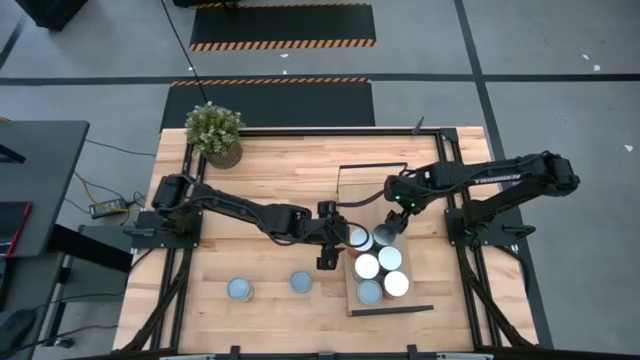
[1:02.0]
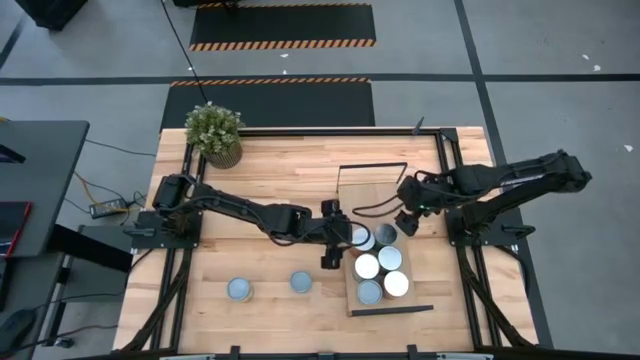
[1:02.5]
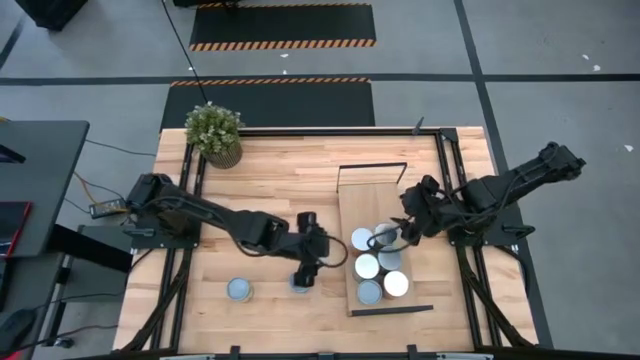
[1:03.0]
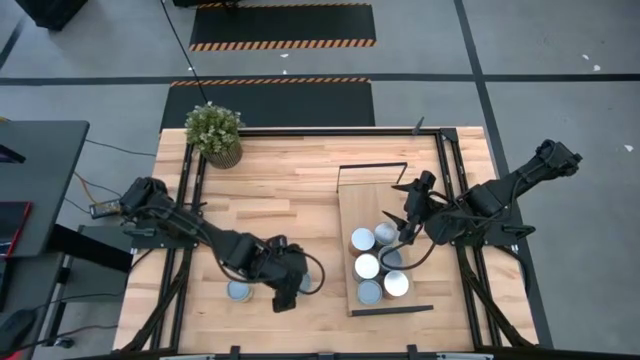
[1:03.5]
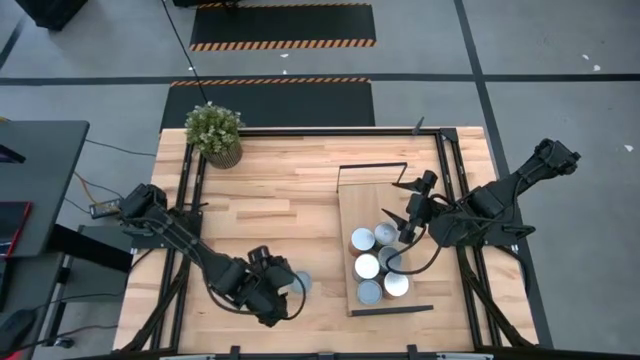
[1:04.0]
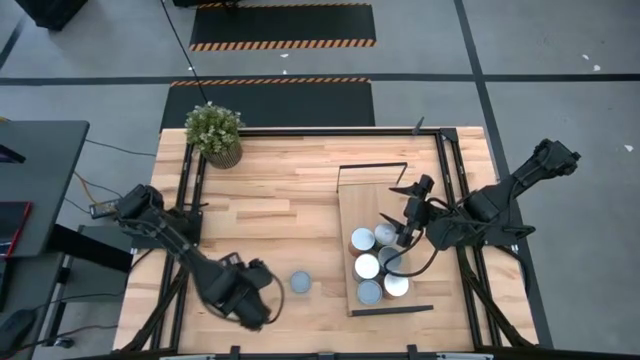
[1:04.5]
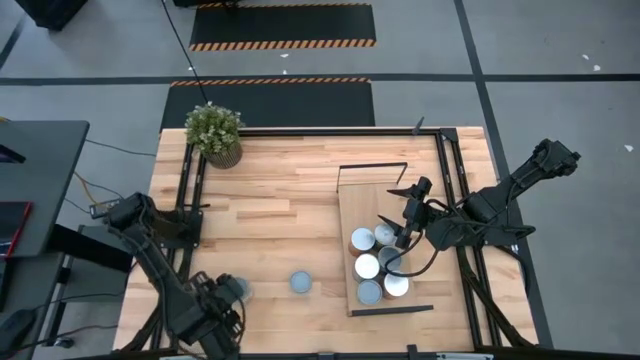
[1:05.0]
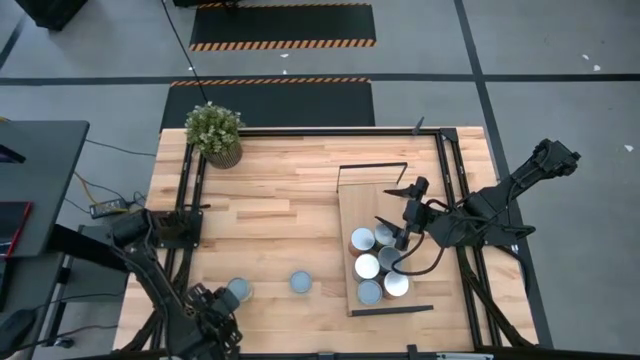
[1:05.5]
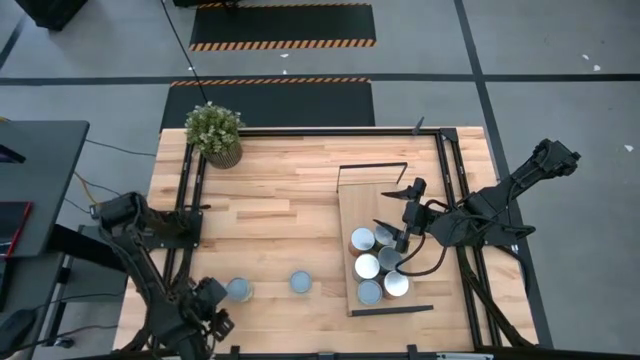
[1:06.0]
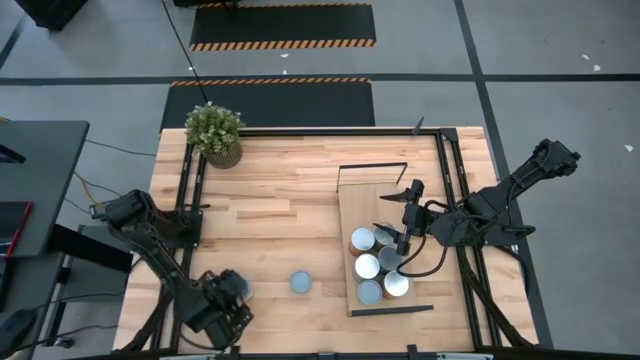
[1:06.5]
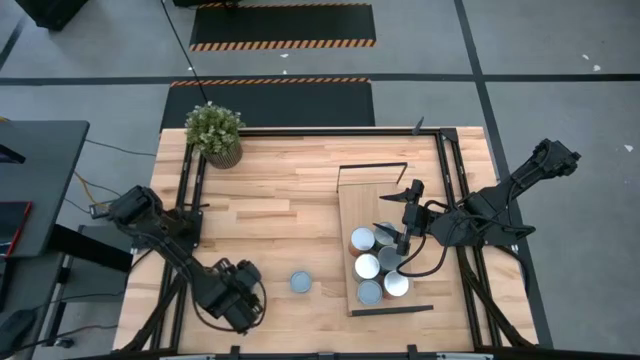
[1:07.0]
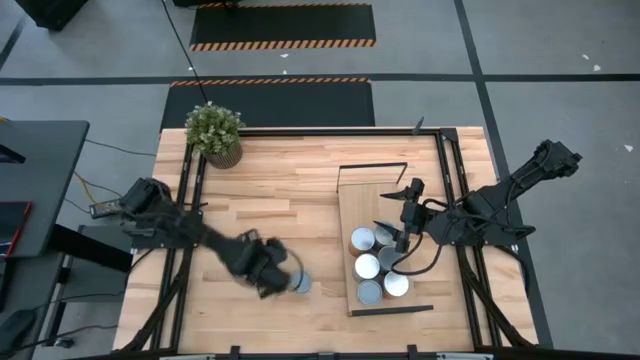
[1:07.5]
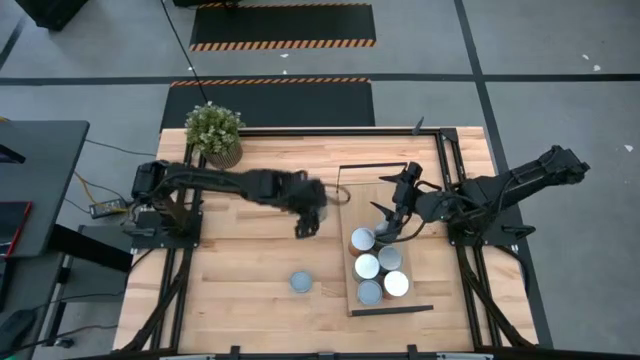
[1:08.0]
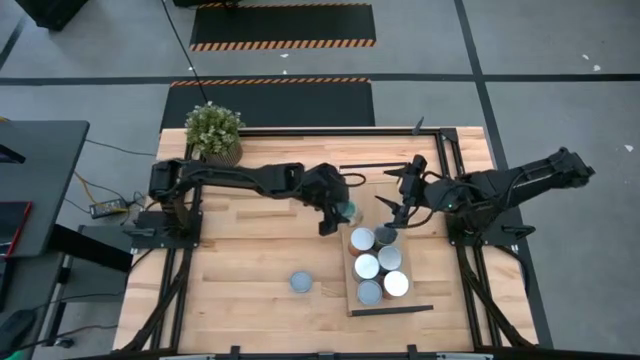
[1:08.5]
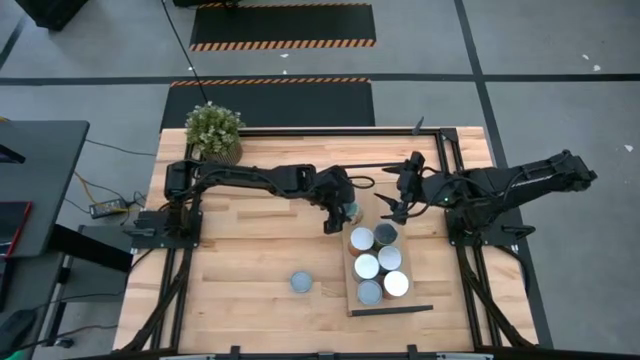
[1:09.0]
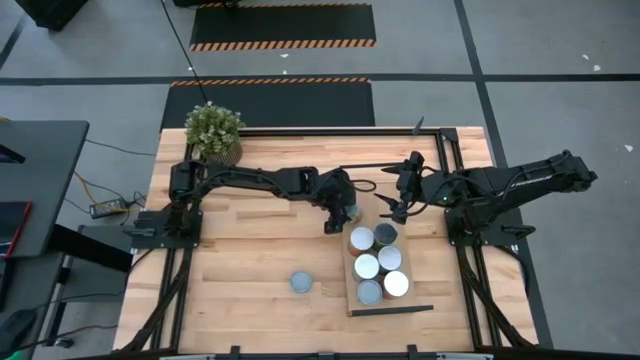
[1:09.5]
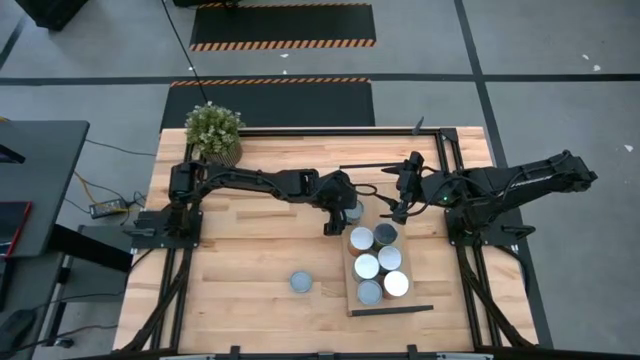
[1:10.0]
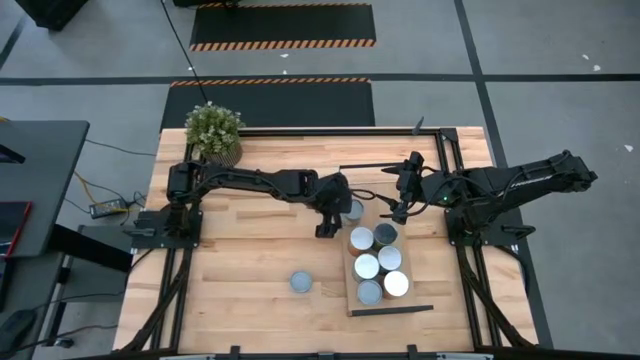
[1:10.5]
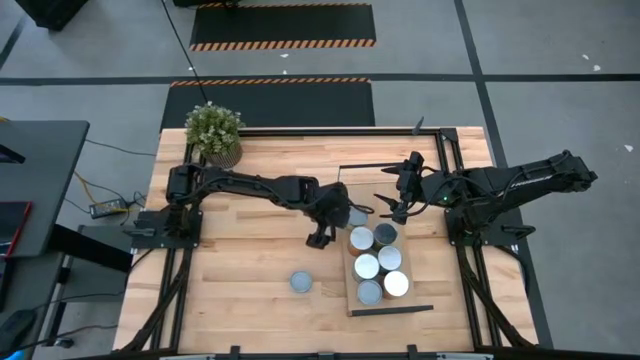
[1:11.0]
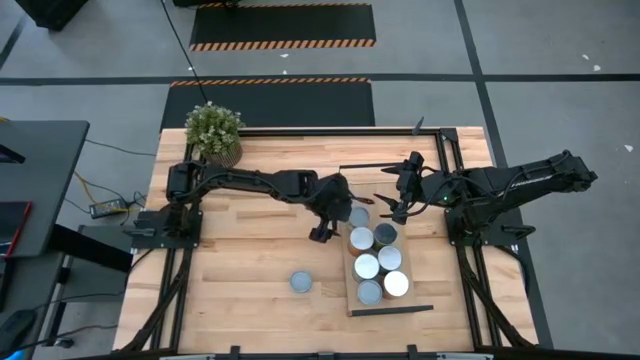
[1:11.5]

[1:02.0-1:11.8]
Task: Pick and place cans onto a shelf
Put the canned chicken soup on the shelf

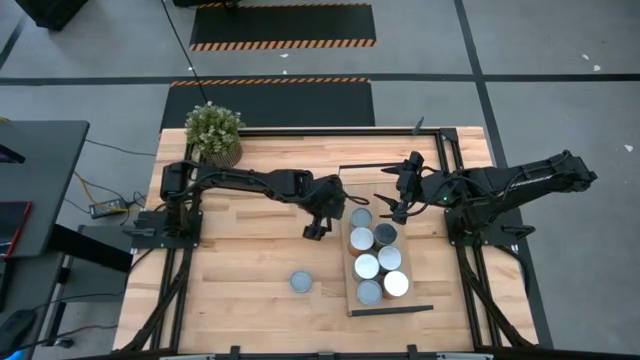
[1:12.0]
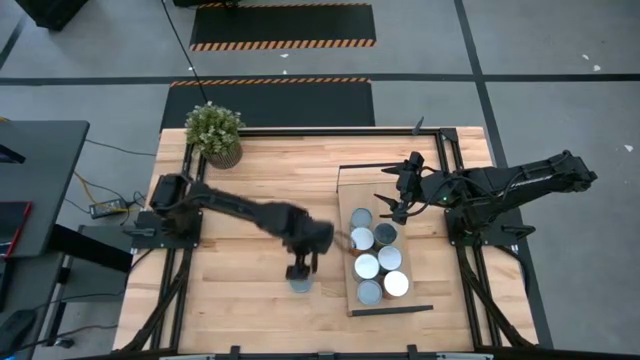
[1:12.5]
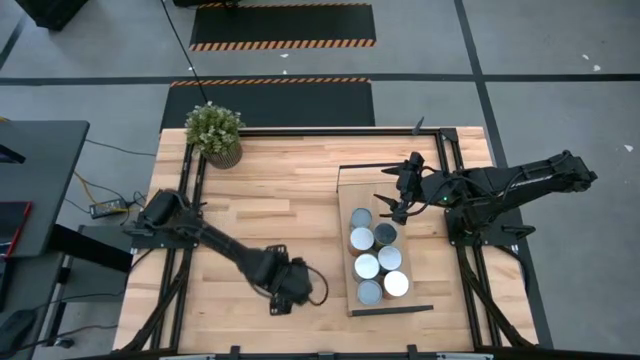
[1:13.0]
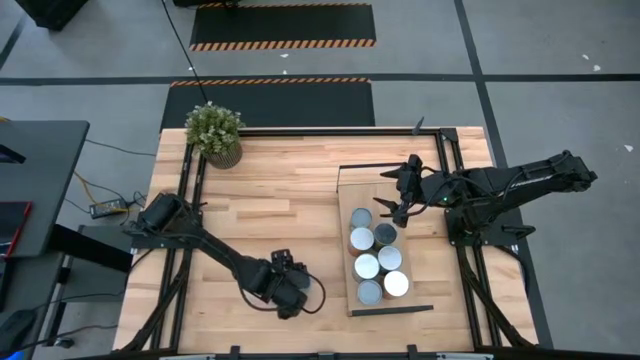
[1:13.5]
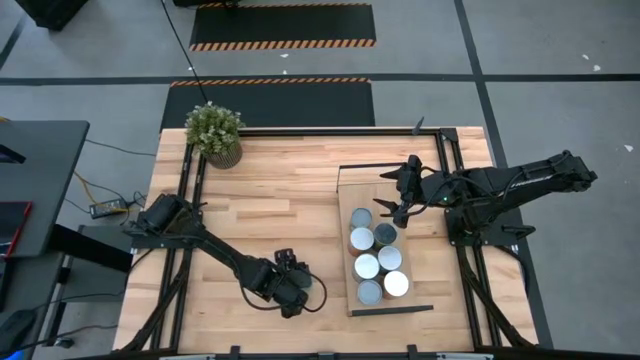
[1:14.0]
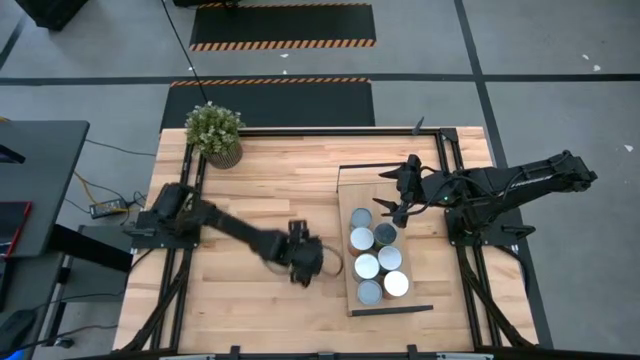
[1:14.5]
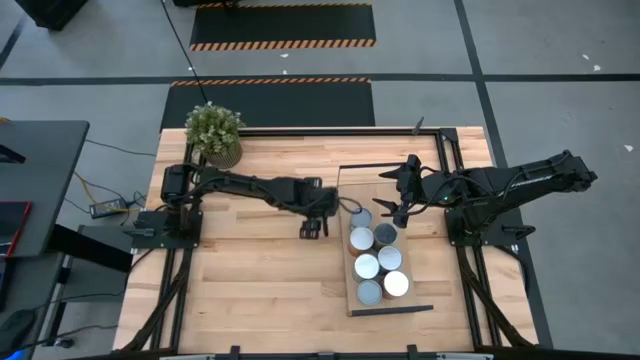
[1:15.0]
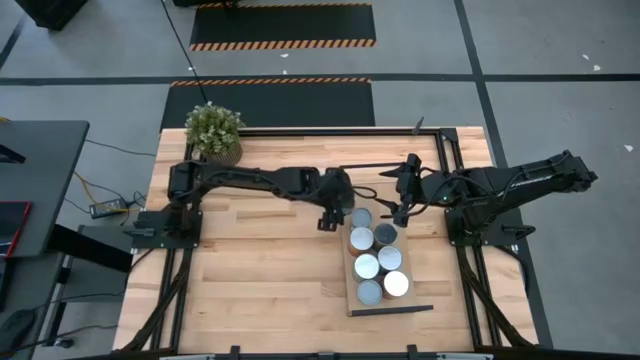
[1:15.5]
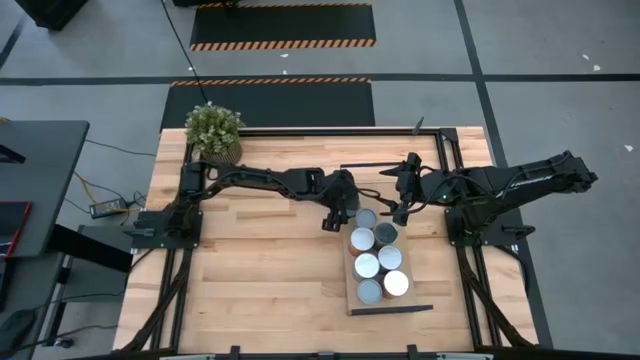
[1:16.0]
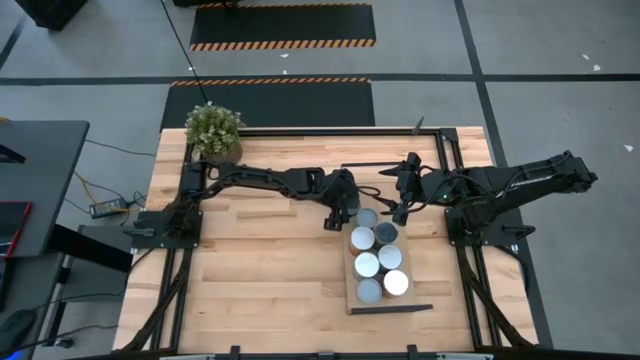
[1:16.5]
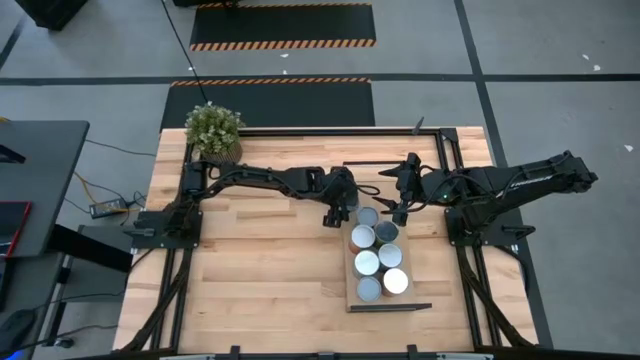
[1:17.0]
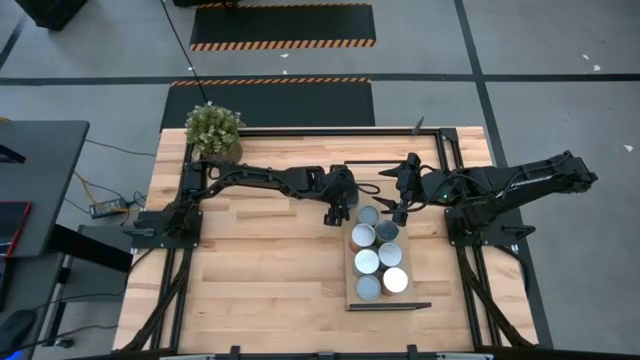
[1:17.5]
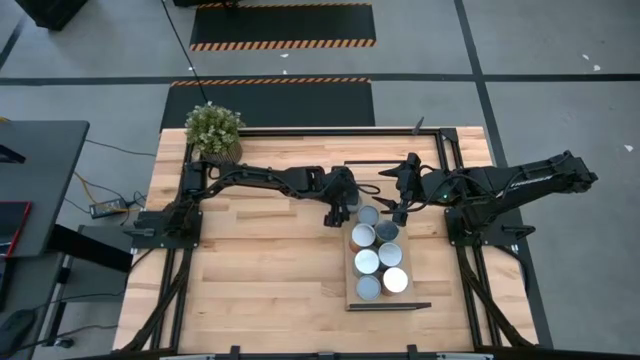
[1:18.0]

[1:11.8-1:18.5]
Put the canned tuna on the shelf

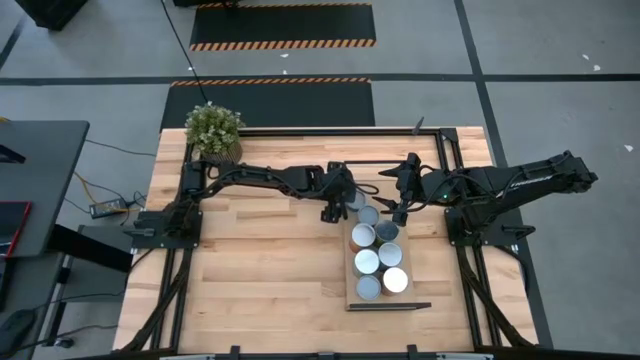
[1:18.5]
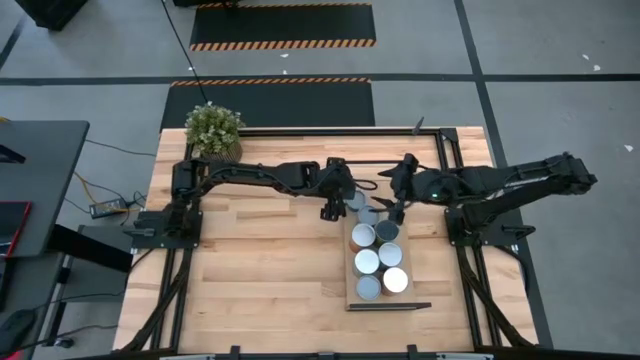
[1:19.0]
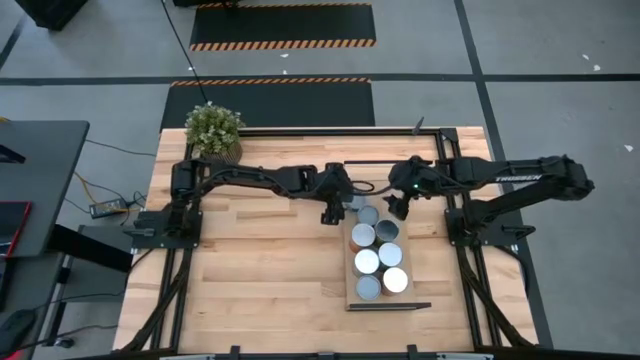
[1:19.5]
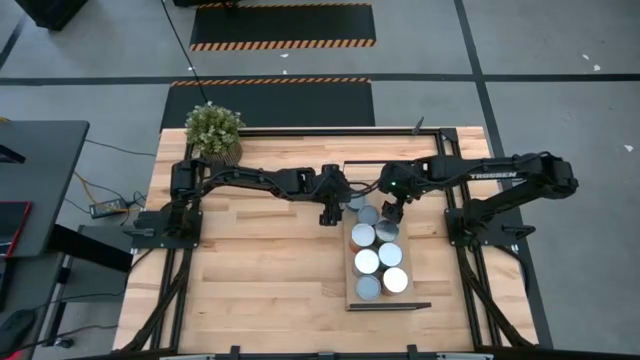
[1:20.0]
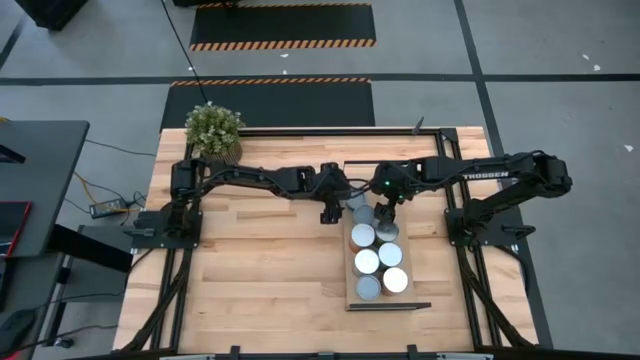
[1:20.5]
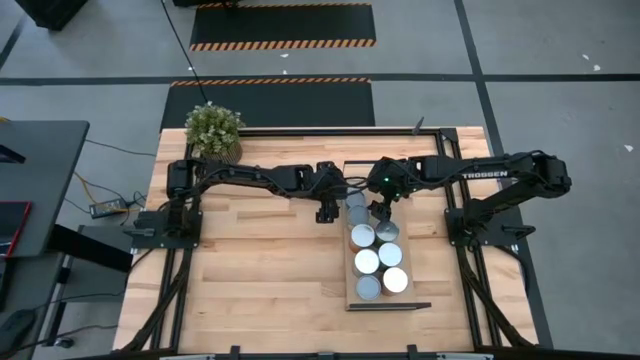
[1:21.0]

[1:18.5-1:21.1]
Adjust the canned chicken soup on the shelf

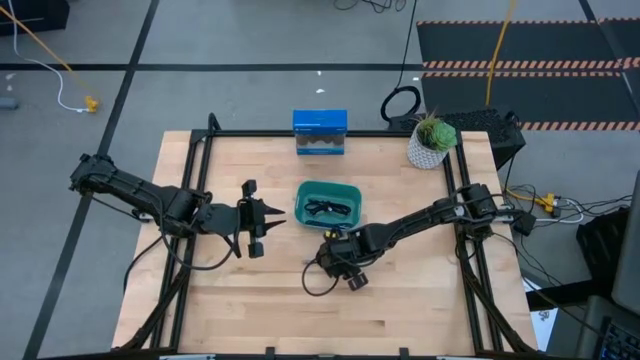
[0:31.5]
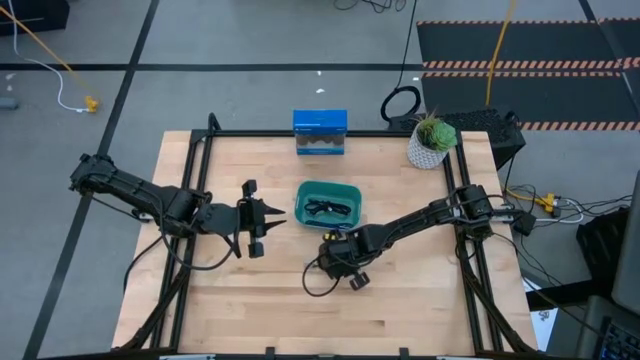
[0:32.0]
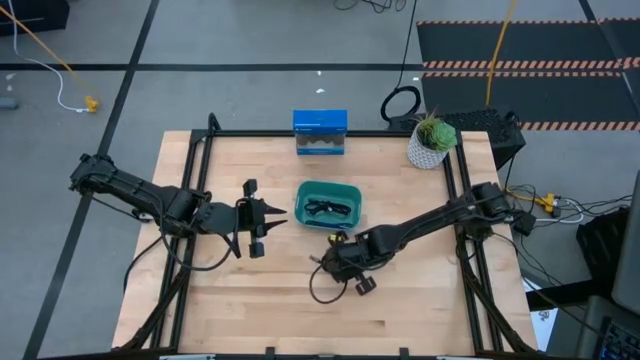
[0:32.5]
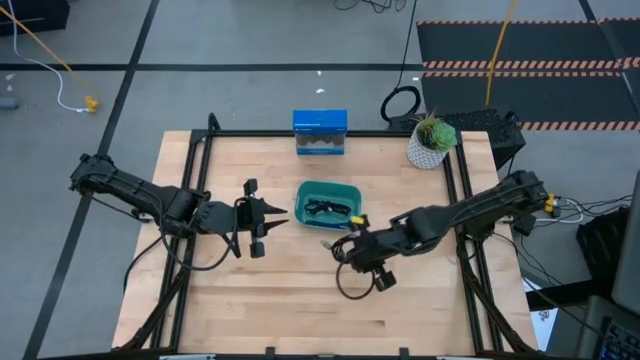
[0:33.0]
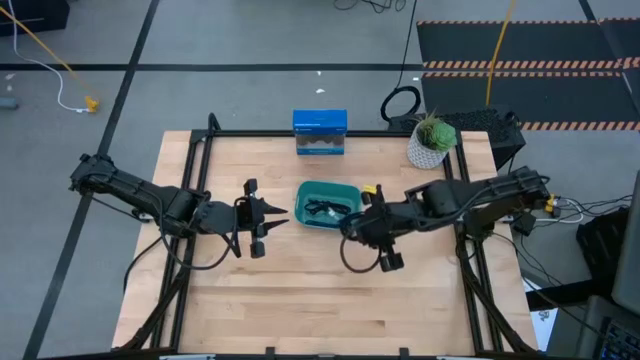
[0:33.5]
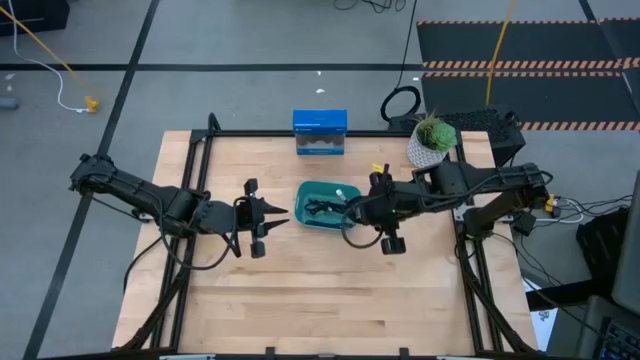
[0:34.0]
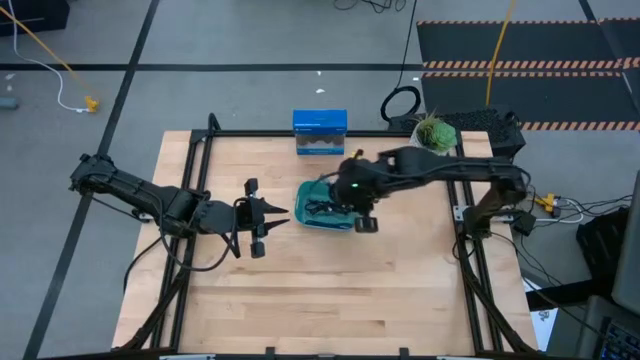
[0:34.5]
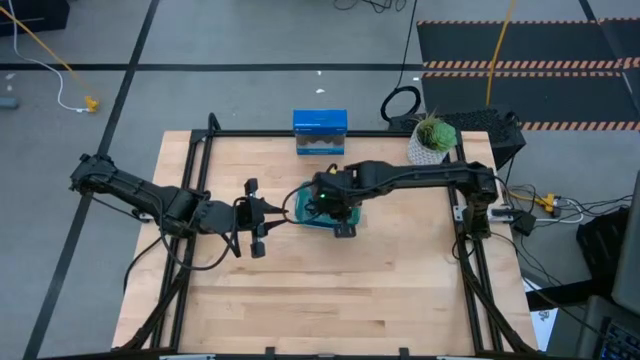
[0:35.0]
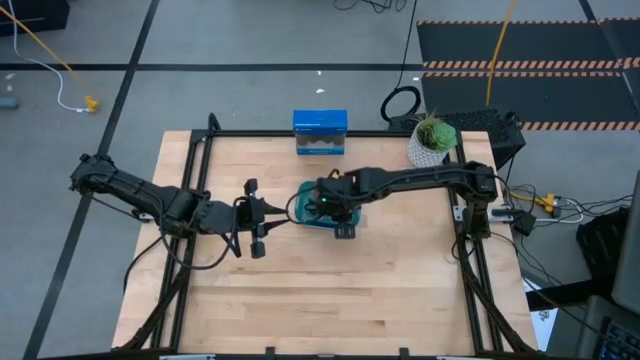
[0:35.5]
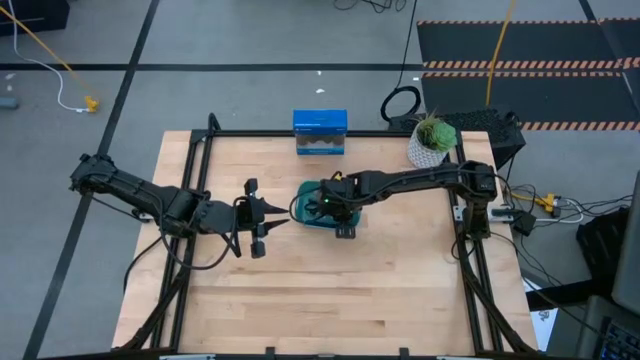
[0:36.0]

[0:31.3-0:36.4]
Task: Pick and place USB-C Cables
Put the black charger cable into the green container
